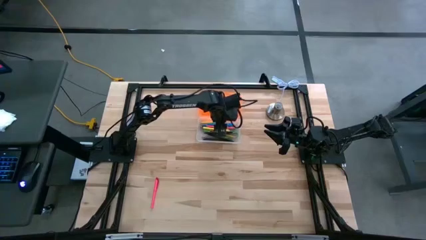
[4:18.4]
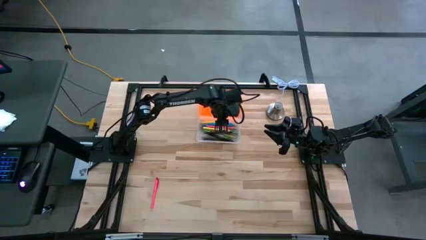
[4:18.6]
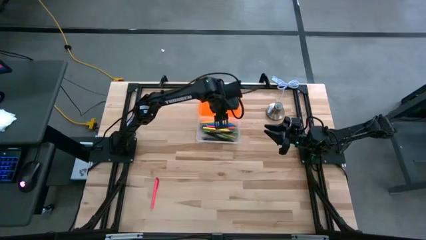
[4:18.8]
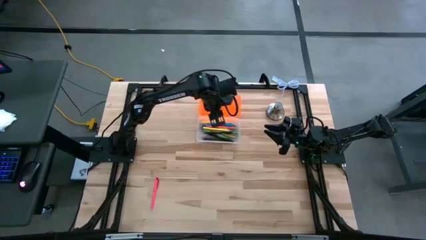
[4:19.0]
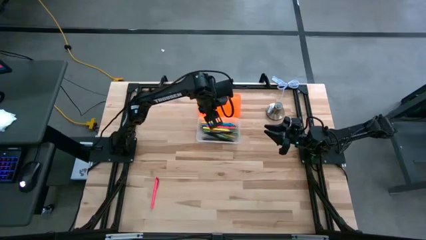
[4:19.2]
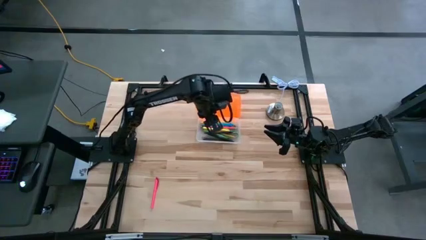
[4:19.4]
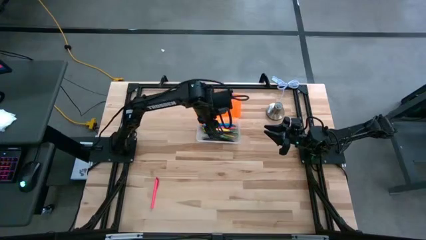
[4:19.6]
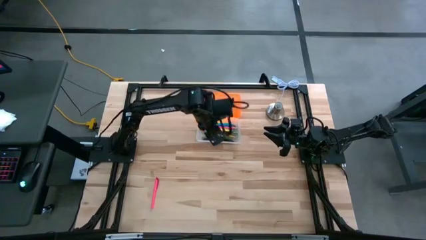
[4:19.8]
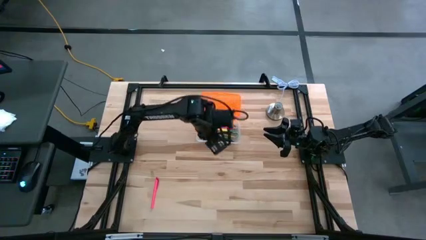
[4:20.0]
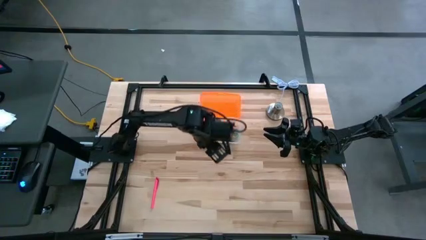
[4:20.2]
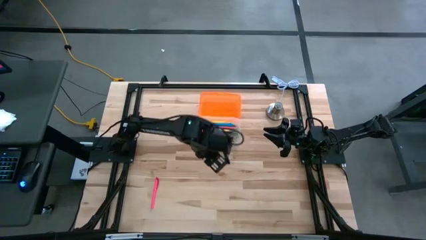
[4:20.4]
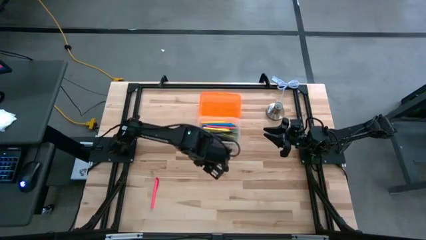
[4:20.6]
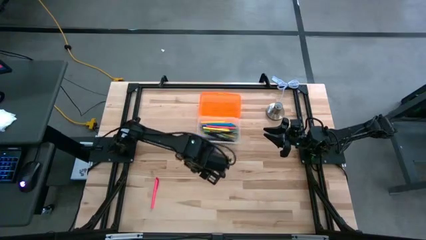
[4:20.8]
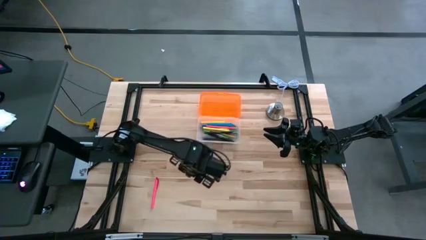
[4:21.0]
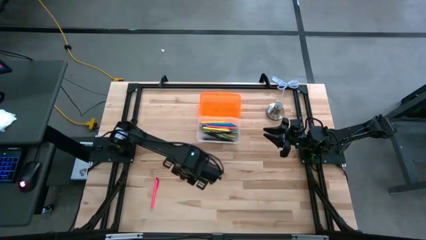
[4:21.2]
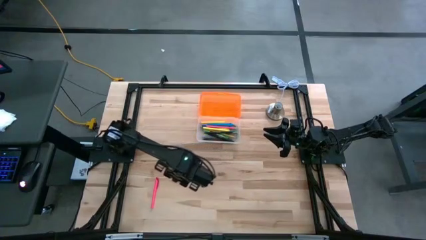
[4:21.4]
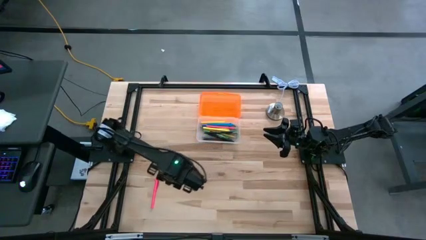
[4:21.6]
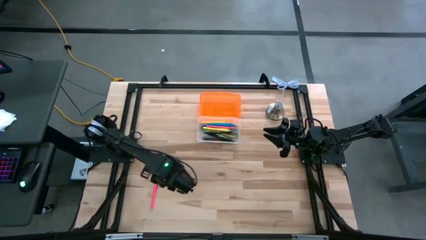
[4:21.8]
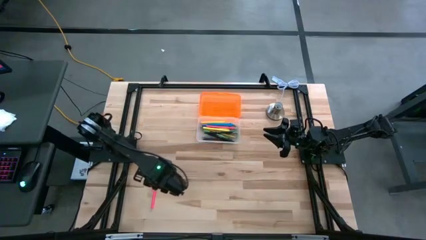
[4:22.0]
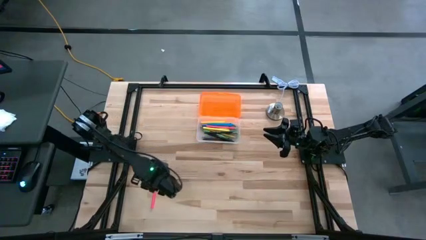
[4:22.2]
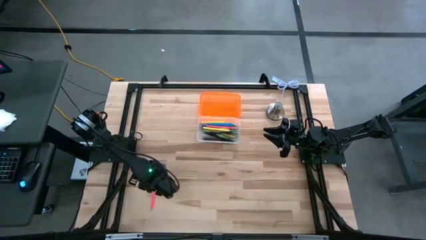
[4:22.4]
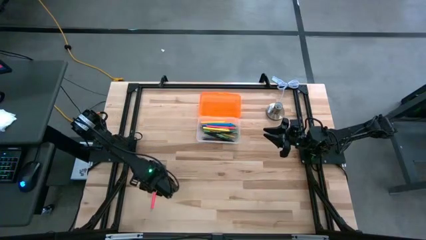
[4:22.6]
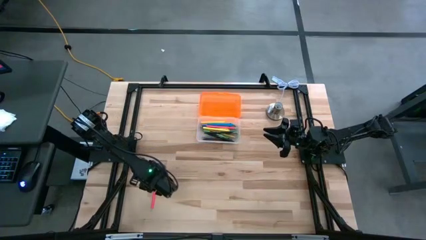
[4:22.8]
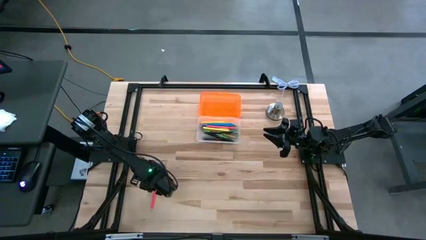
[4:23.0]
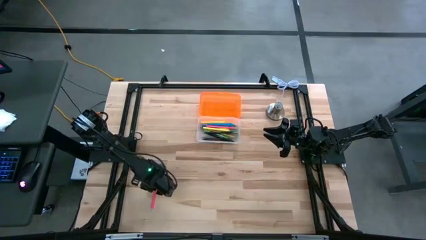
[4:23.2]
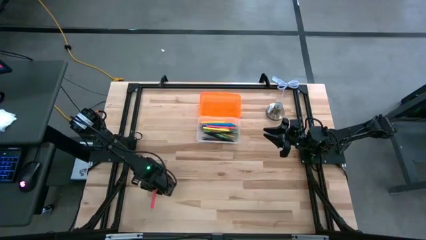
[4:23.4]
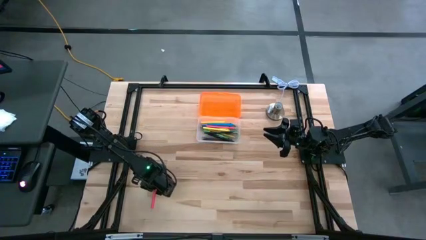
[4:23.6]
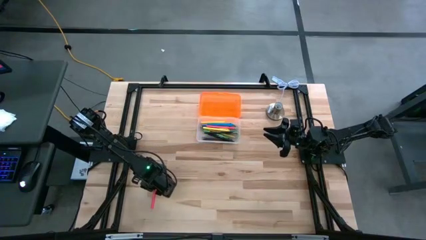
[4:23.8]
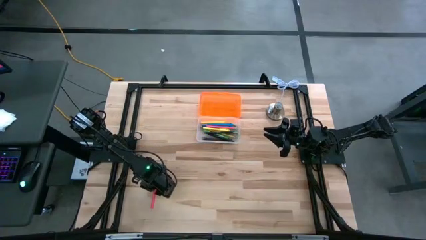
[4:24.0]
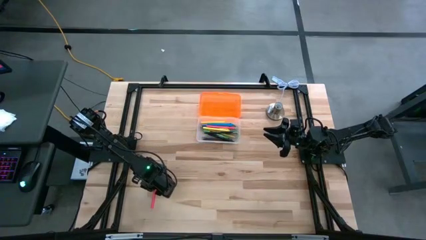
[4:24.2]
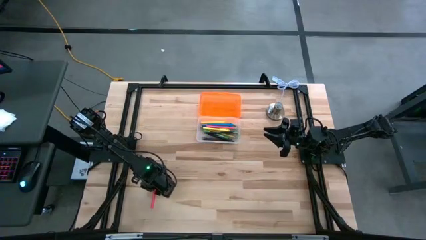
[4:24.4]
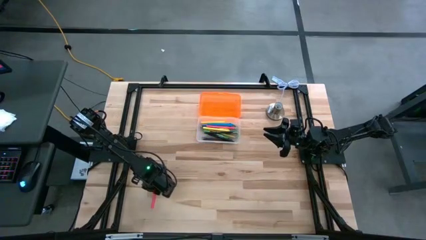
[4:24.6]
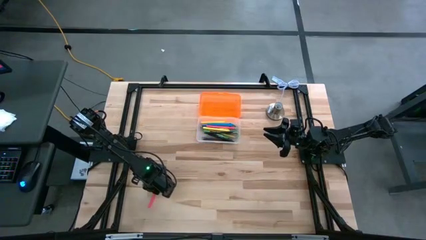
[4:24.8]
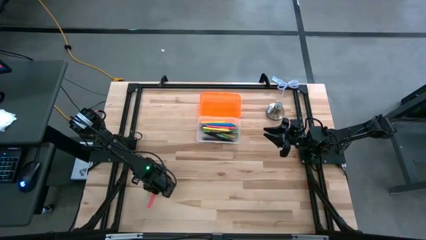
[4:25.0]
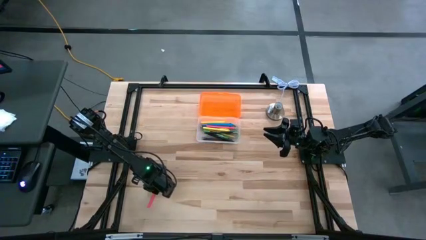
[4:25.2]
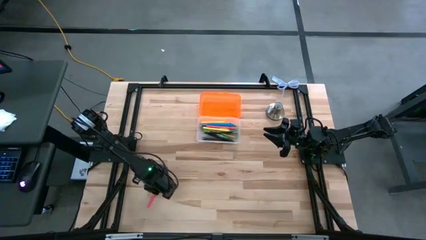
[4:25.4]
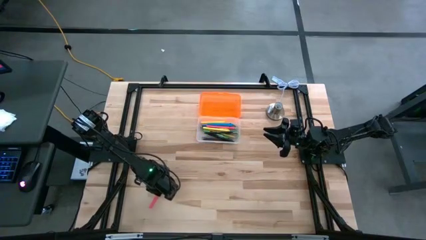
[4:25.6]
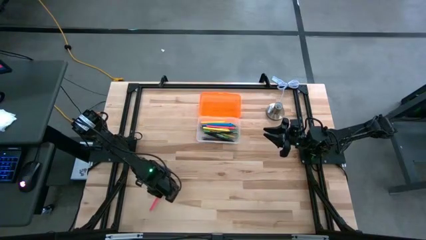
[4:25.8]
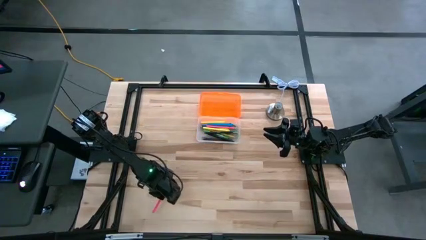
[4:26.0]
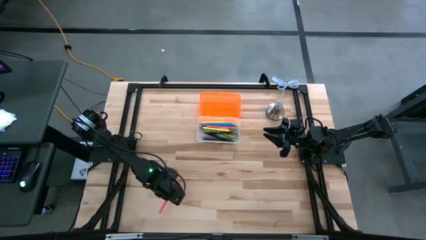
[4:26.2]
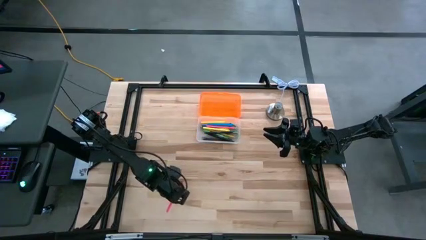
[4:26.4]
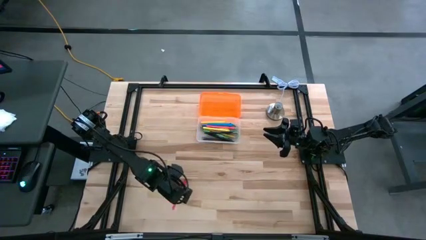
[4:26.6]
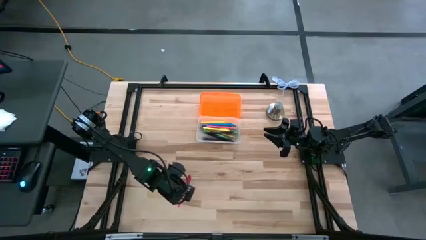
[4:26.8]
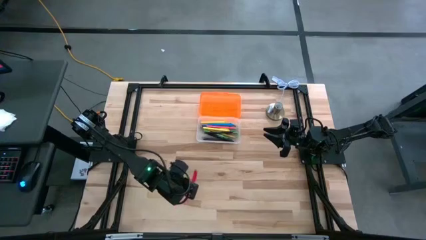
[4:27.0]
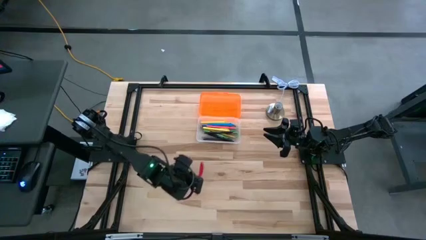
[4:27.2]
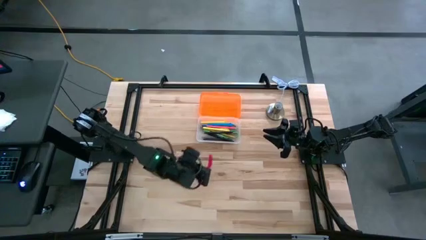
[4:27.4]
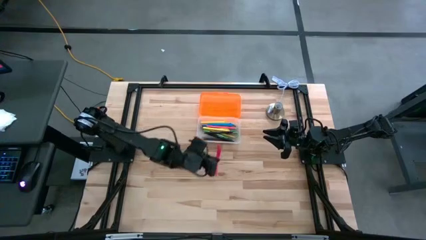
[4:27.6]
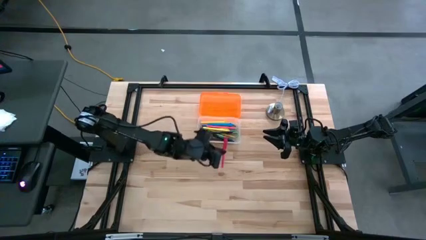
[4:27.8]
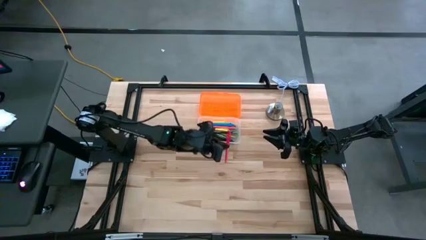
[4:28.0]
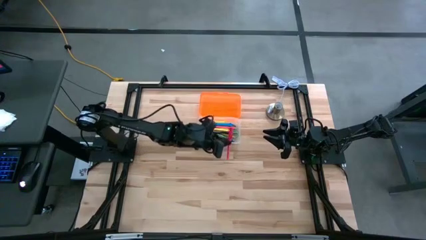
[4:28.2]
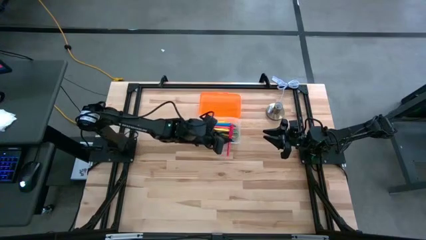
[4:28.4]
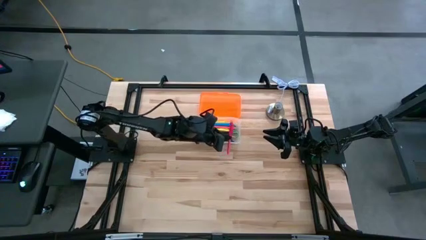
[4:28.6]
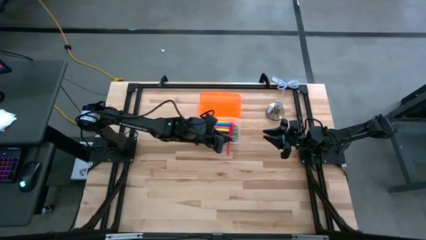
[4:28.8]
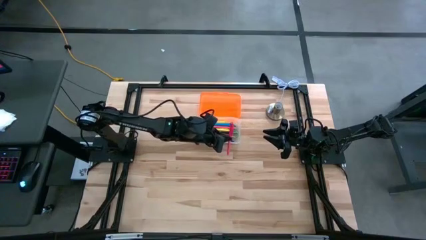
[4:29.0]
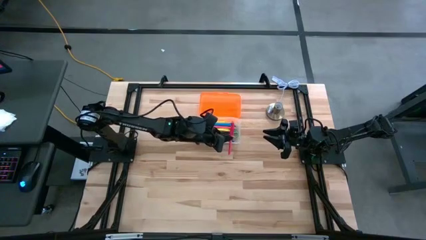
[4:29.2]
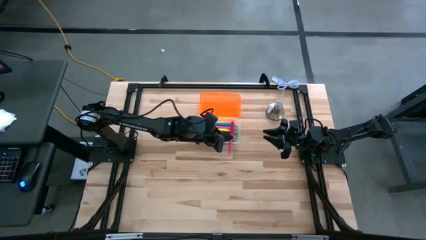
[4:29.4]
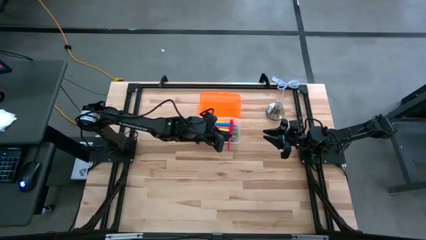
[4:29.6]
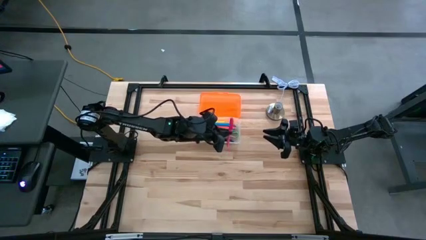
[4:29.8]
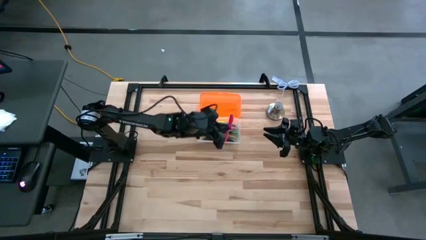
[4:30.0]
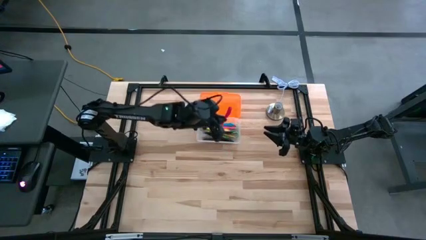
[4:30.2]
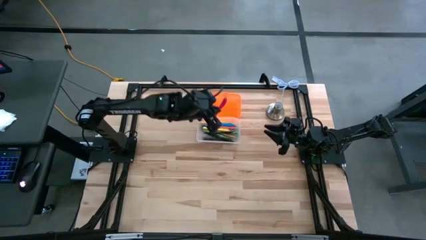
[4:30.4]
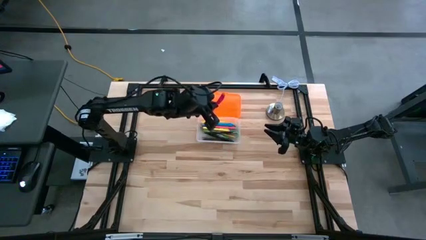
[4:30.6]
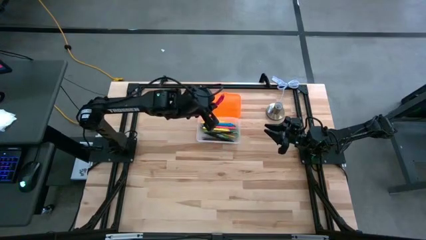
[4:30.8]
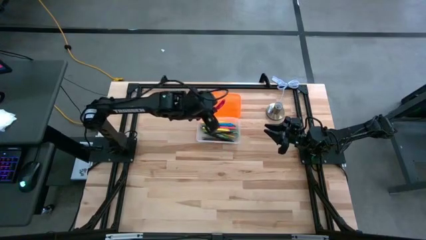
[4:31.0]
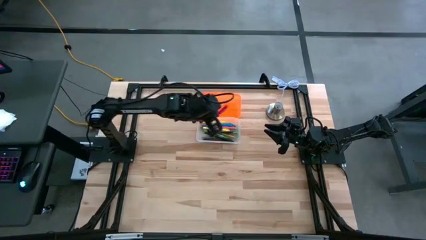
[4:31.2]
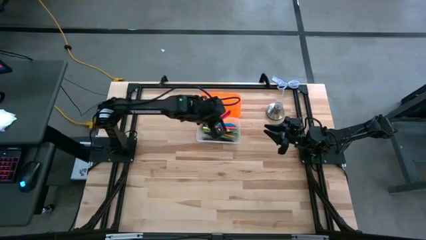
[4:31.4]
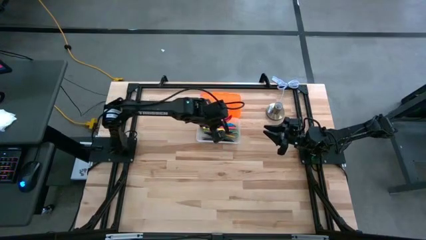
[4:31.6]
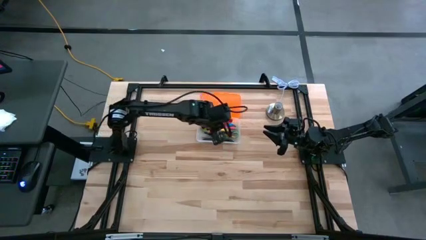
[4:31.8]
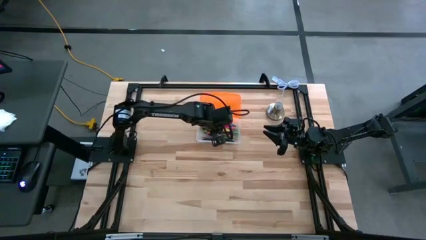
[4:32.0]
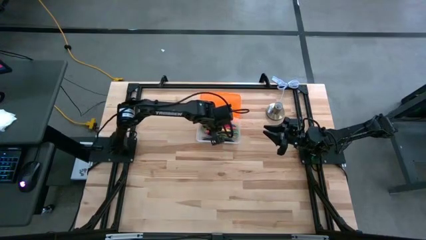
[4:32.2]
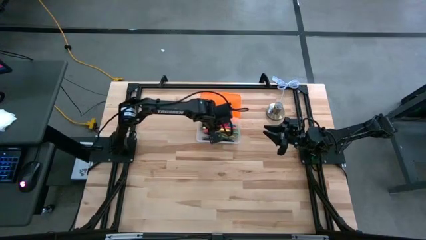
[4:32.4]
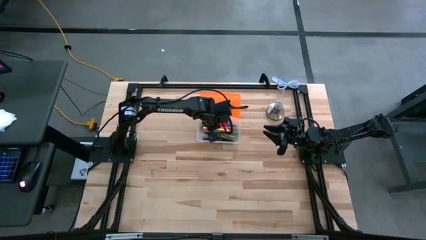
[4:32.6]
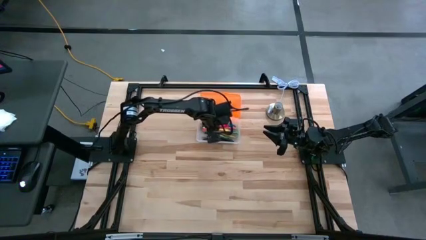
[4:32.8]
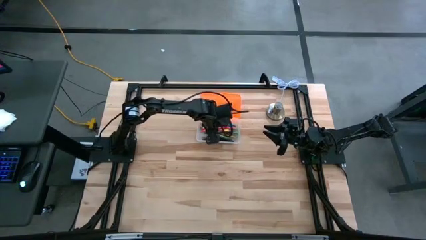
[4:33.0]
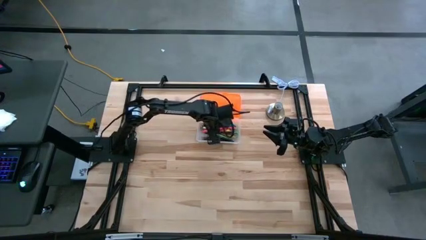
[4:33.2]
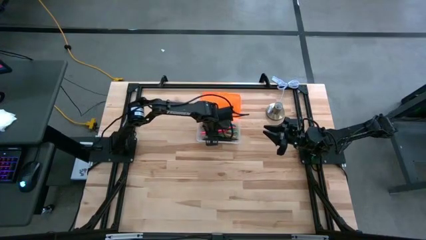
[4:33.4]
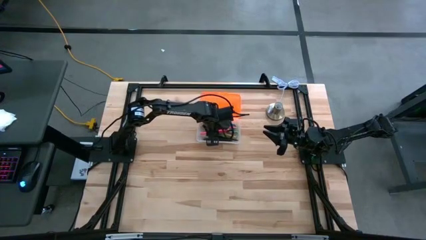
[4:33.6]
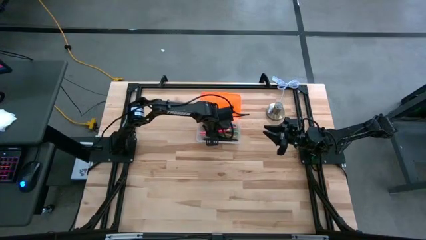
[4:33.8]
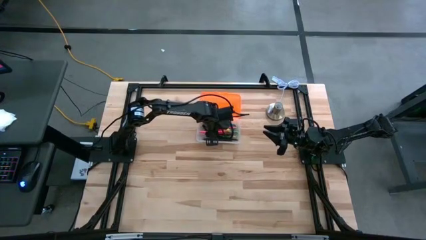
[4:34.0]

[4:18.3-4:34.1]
Task: Pick & place school supplies into a supply box
Put the pink pen into the orange supply box

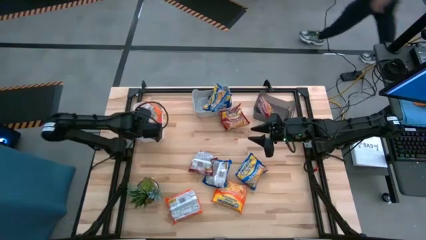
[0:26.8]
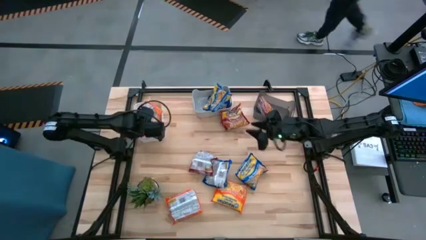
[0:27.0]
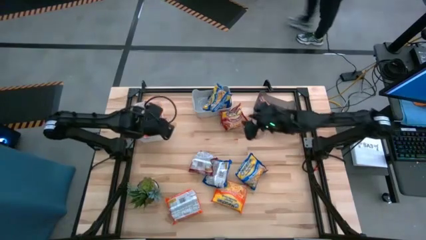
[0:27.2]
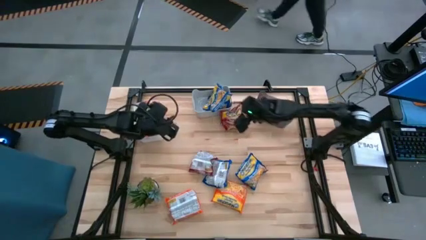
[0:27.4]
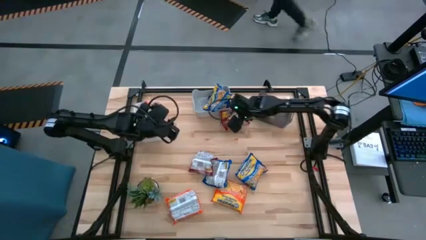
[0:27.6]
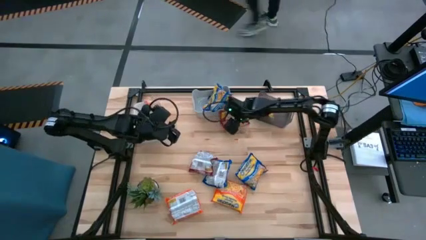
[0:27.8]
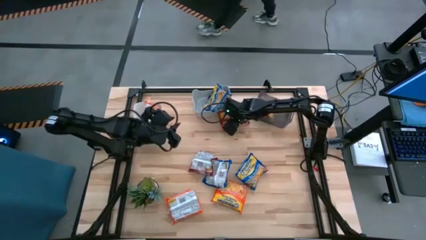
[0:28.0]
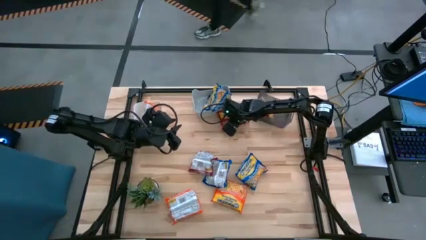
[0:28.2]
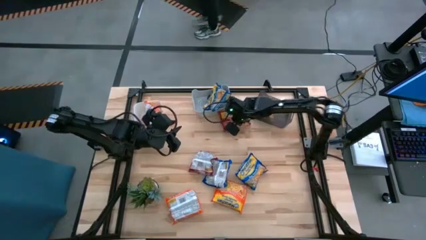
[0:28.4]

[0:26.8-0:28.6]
Task: Sort Maruchan noodles
Put the top middle red noodle pack into the black bin
